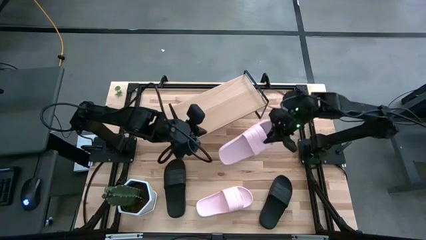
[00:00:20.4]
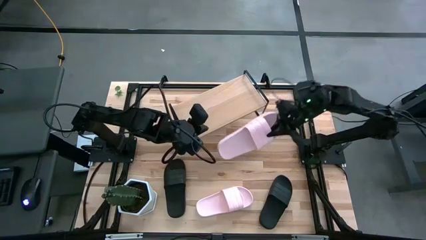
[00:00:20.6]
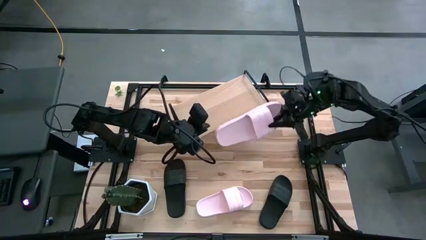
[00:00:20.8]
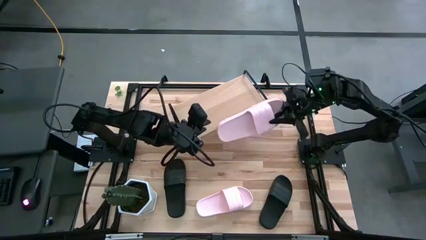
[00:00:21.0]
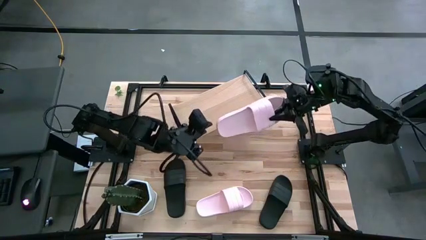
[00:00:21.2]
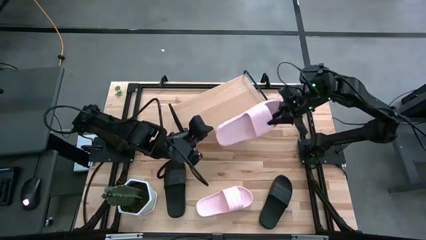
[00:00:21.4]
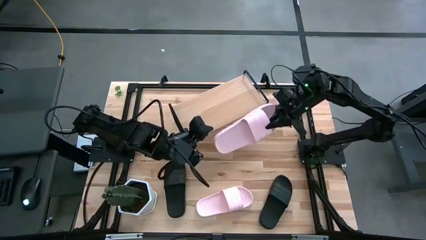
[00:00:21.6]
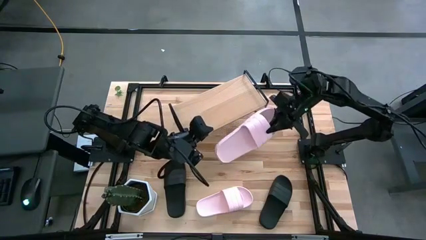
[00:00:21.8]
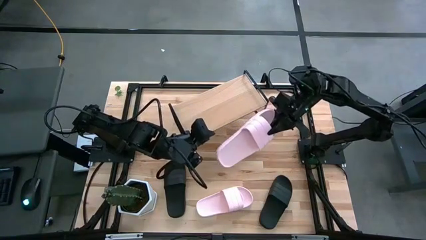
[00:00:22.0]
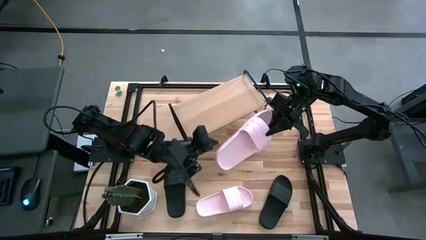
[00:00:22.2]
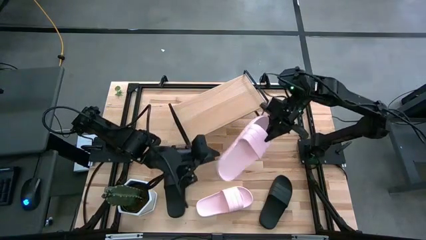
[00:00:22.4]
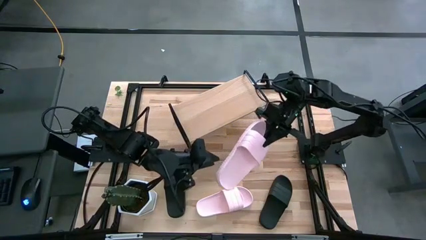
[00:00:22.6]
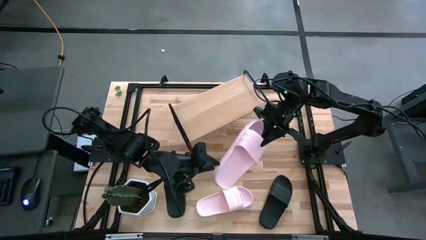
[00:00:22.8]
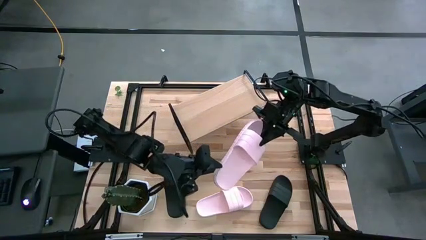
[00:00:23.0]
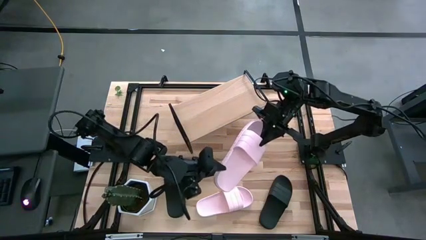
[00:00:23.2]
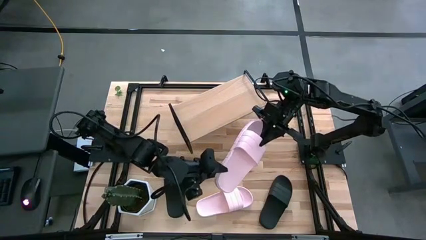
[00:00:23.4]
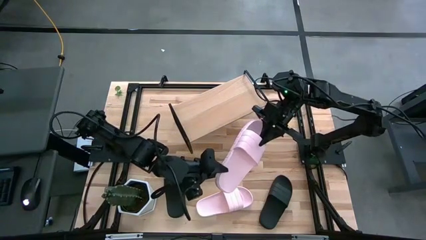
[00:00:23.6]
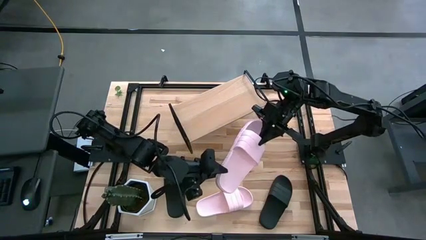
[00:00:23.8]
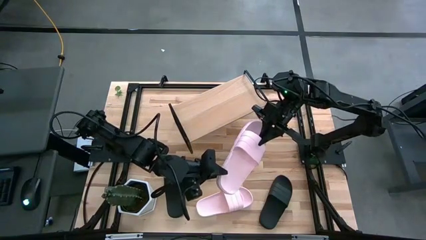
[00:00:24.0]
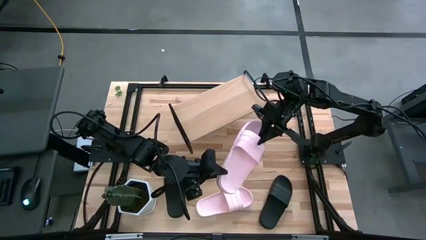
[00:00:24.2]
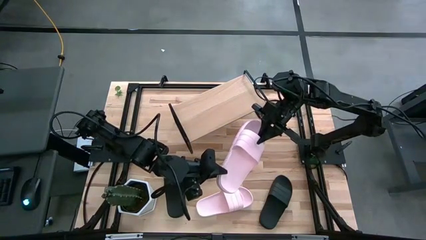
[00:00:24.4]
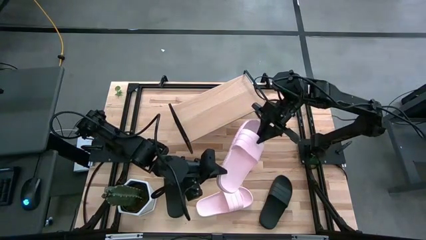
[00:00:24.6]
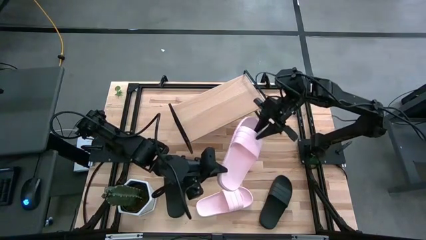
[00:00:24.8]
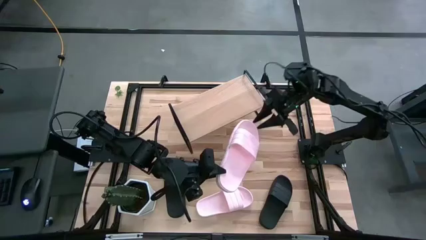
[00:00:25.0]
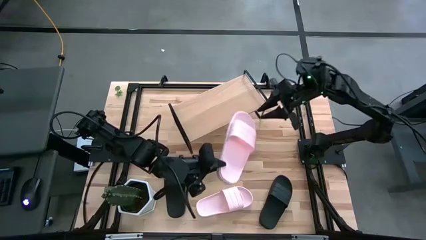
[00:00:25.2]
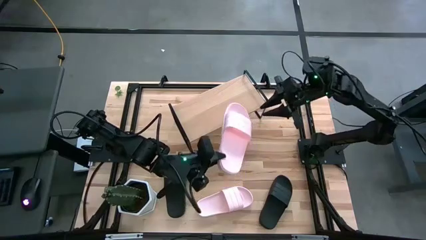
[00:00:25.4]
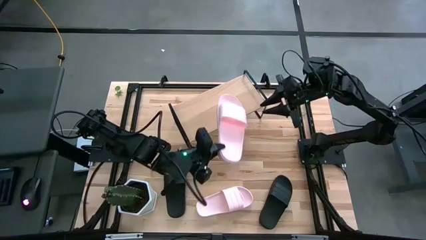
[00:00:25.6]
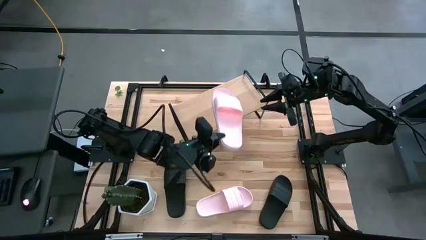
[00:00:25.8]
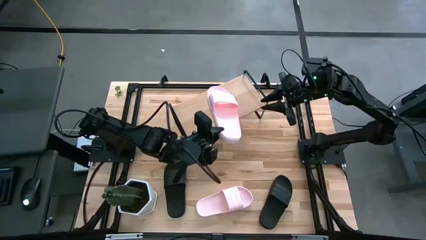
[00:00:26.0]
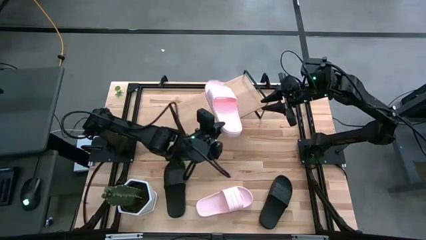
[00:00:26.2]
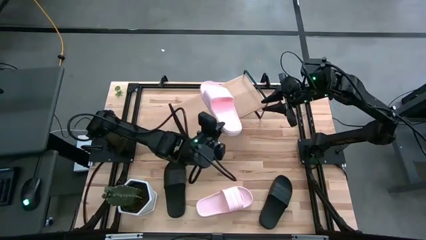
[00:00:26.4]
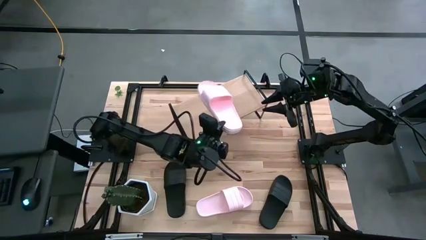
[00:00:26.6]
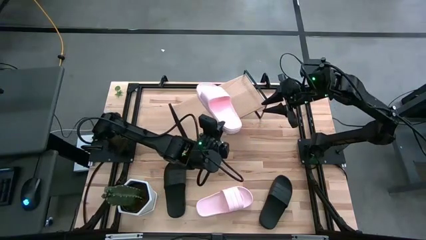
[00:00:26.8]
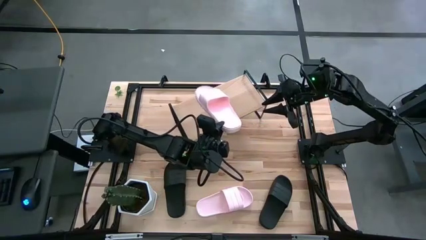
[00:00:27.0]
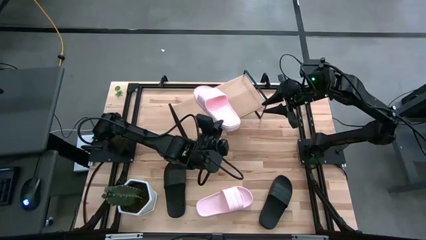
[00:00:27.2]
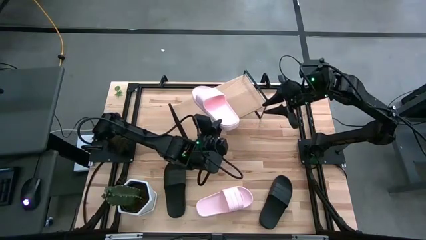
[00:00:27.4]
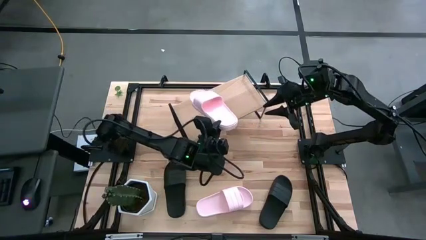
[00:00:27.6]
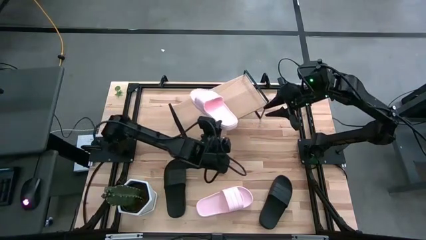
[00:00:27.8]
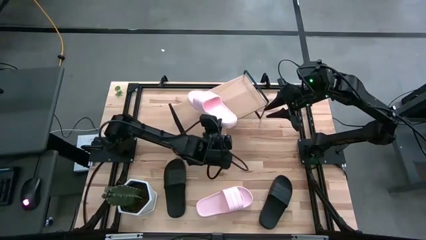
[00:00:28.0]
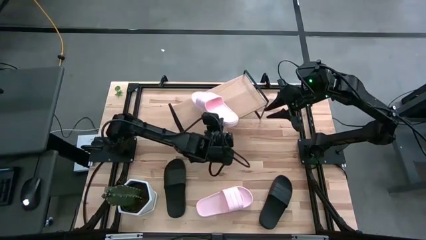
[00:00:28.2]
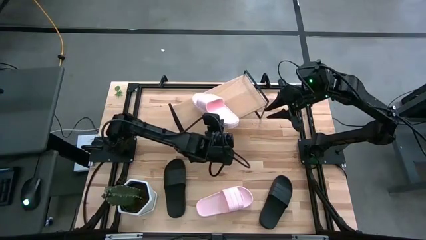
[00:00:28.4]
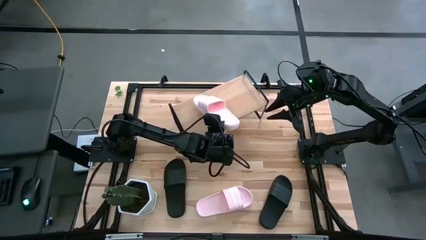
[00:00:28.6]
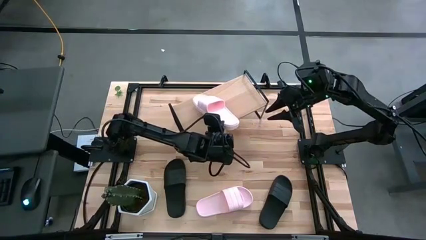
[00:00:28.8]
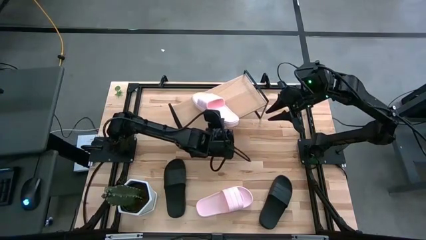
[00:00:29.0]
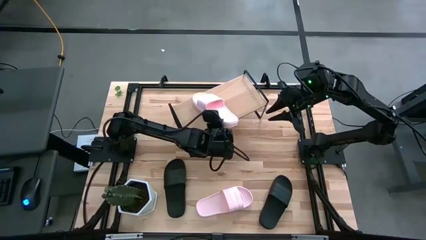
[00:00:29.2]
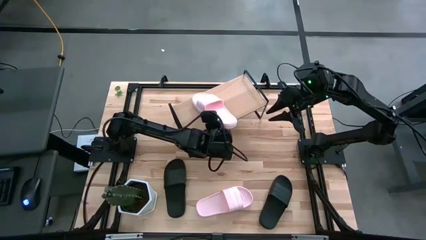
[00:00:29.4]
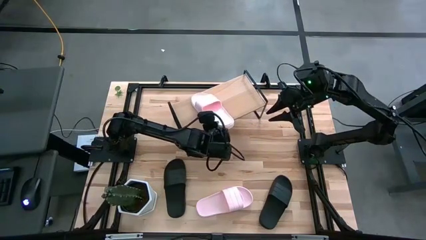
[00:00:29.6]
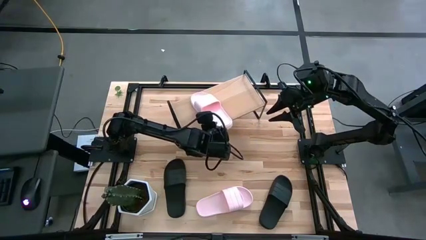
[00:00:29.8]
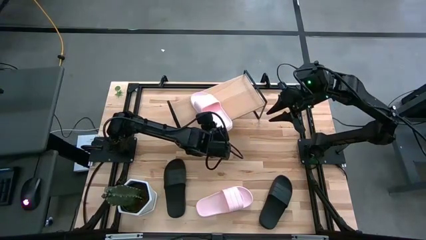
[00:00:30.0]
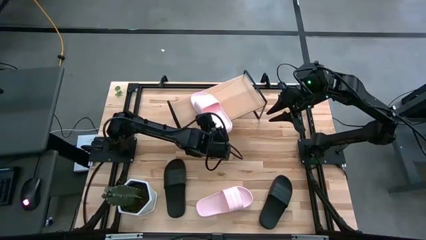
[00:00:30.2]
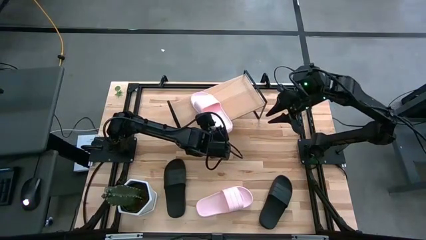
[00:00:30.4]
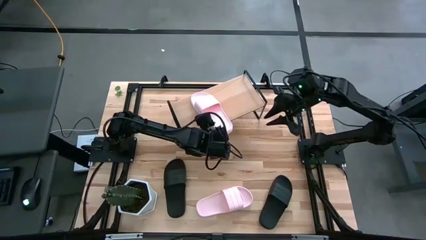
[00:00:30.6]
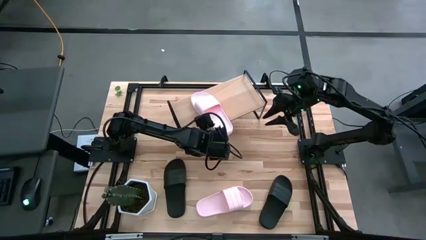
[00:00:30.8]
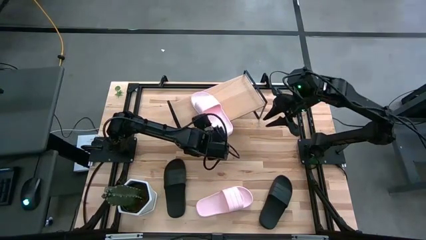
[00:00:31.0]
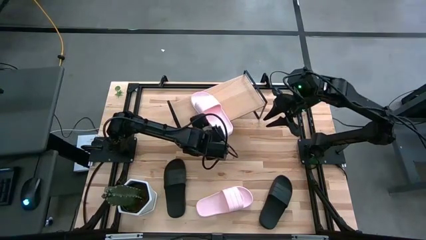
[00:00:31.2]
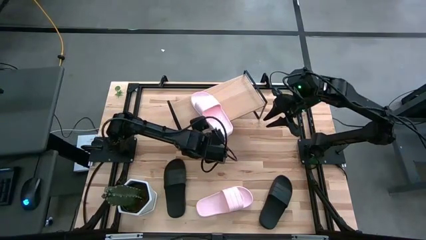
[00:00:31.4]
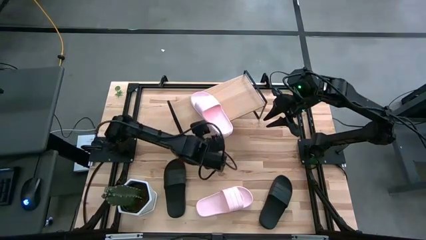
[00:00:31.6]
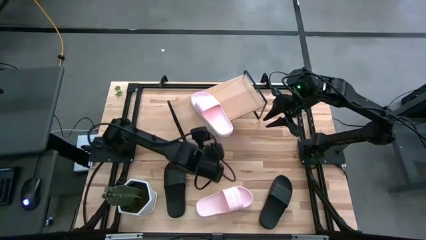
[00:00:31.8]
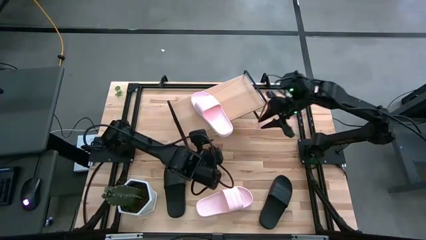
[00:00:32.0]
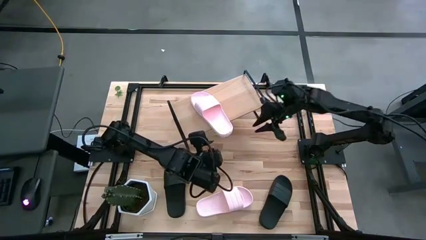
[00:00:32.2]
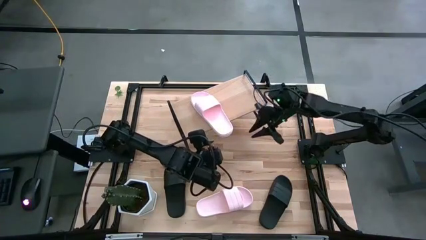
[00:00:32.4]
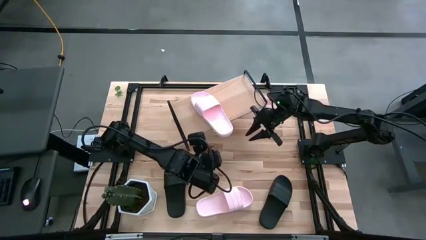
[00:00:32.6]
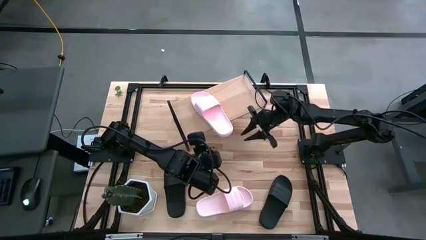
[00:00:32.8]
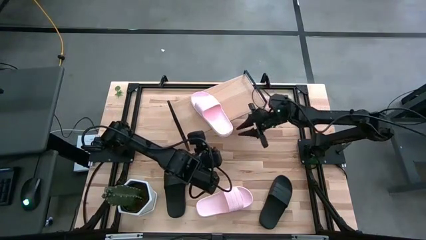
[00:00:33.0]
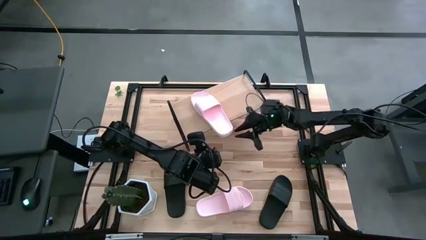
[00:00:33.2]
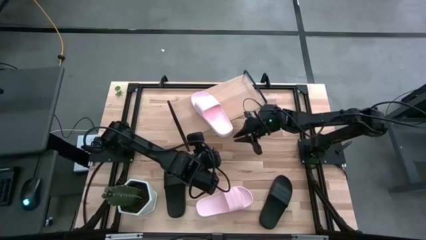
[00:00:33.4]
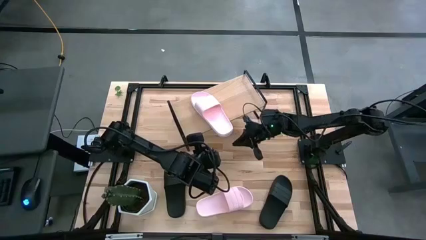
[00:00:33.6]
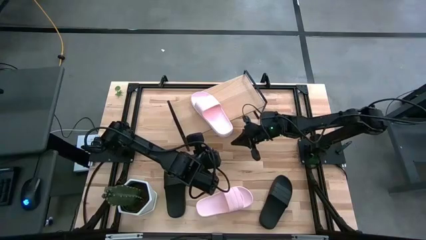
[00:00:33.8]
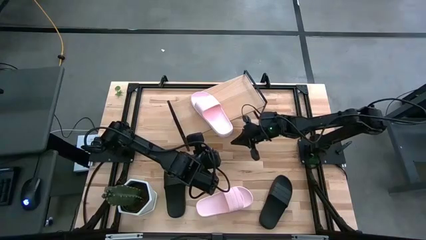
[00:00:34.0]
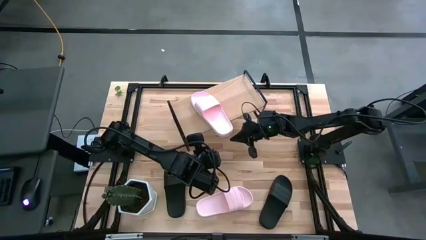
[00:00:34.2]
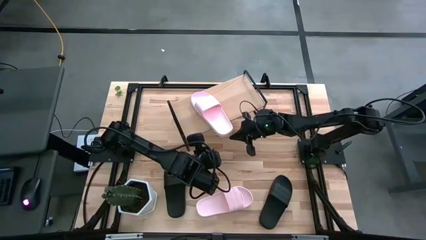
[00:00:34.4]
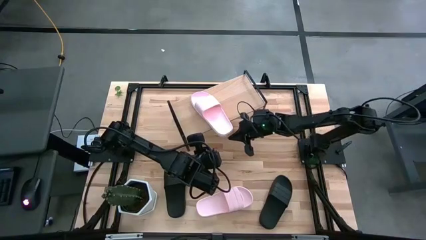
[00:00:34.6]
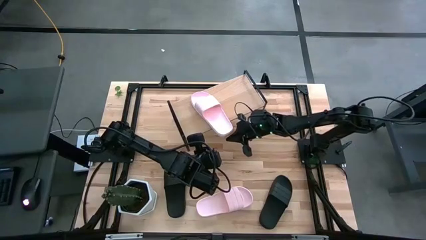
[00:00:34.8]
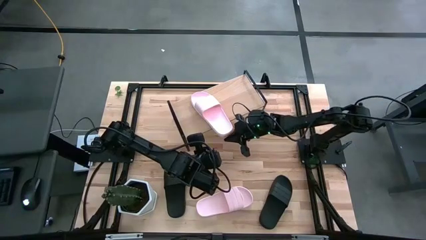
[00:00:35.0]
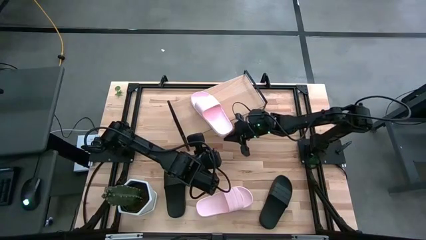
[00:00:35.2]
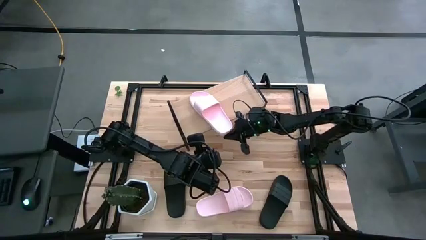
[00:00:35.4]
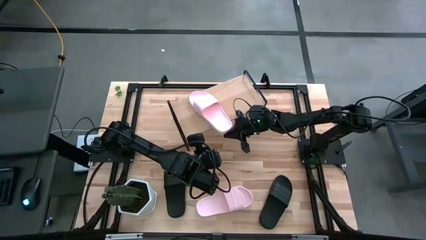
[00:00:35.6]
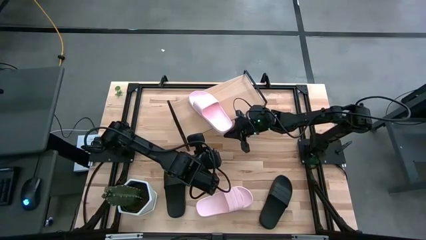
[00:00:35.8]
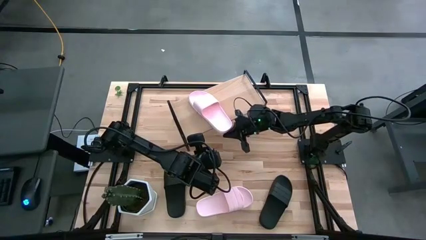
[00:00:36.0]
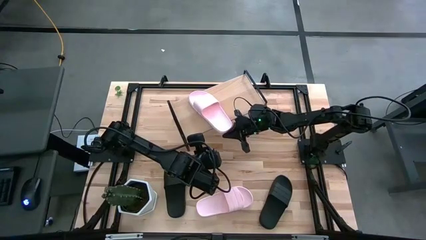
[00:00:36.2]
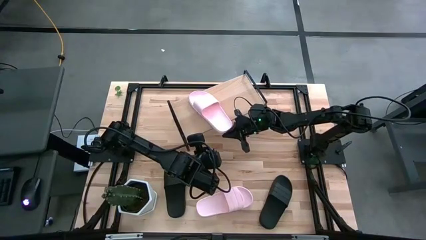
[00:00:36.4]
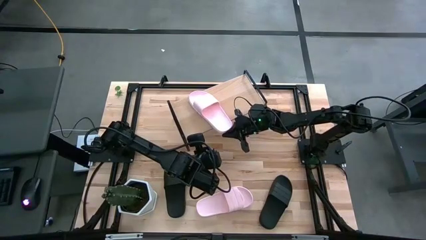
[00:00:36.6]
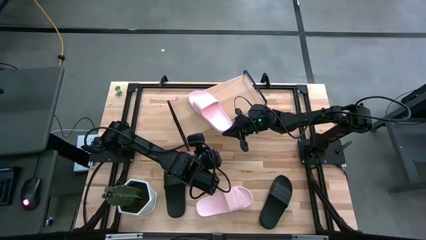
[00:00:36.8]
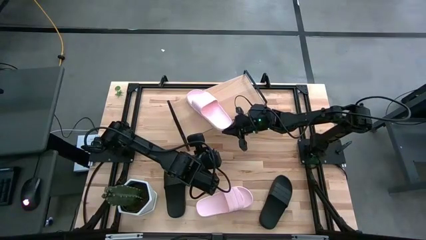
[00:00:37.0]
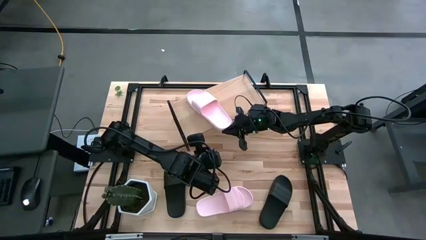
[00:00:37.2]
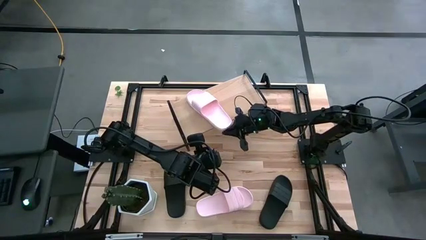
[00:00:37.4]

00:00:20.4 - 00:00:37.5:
Task: Pick and place slides into the shelf
Put the top pink slipper on the shelf
